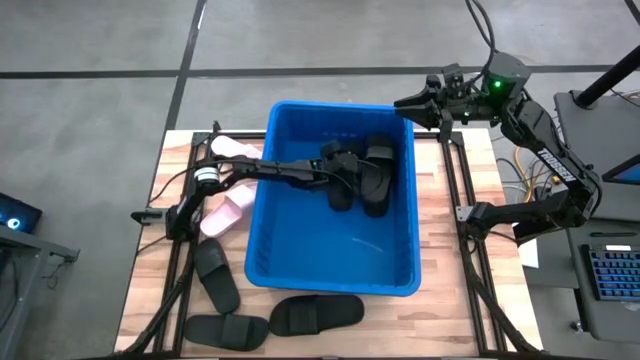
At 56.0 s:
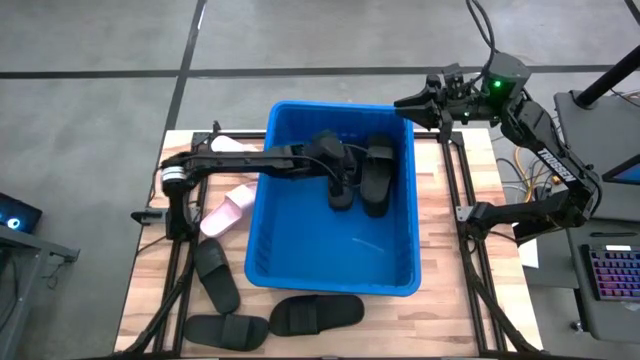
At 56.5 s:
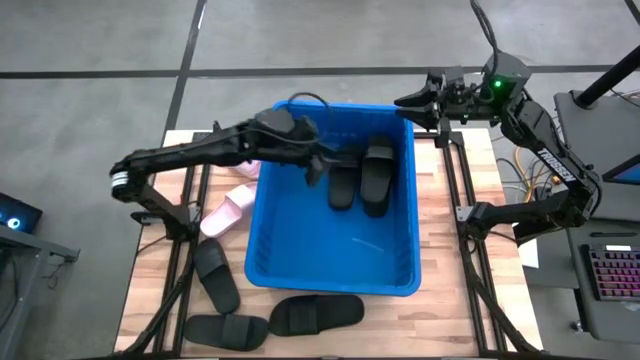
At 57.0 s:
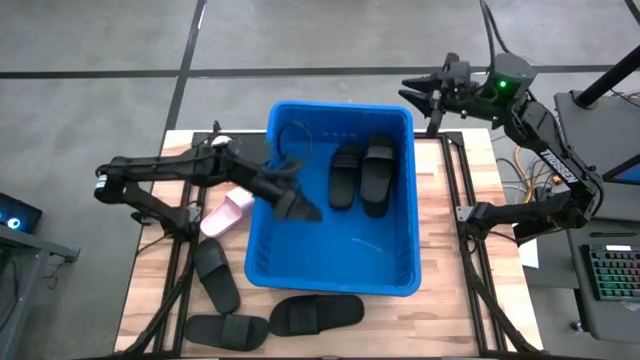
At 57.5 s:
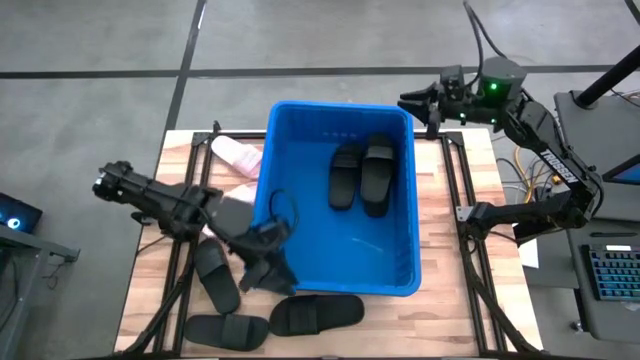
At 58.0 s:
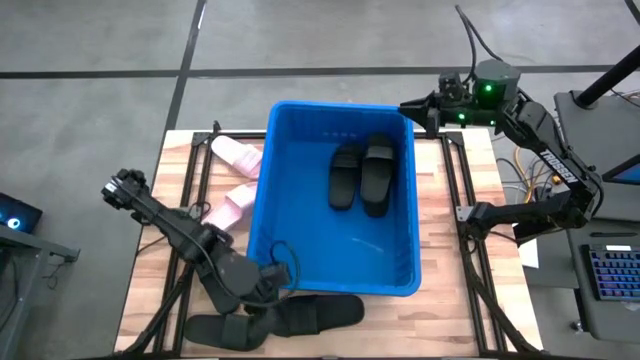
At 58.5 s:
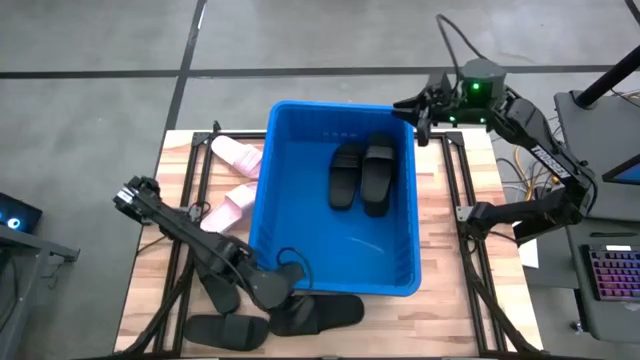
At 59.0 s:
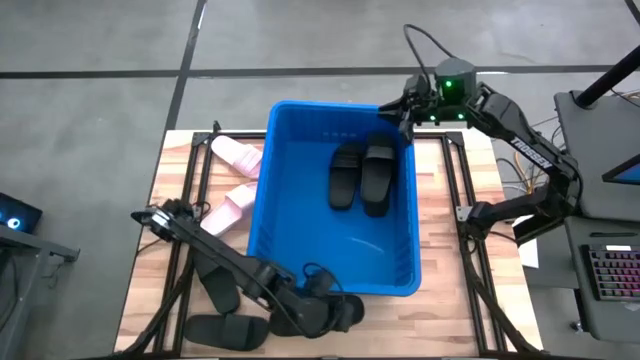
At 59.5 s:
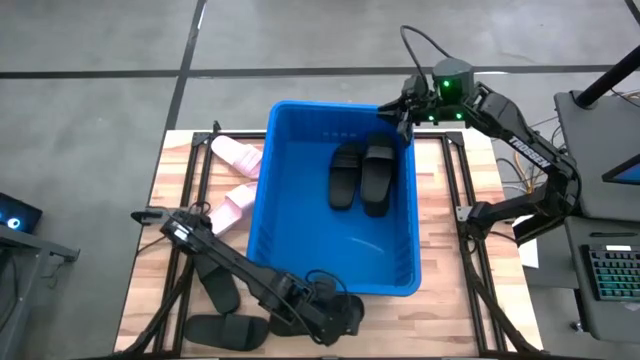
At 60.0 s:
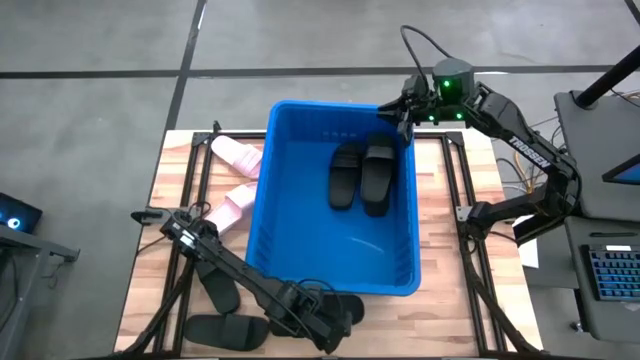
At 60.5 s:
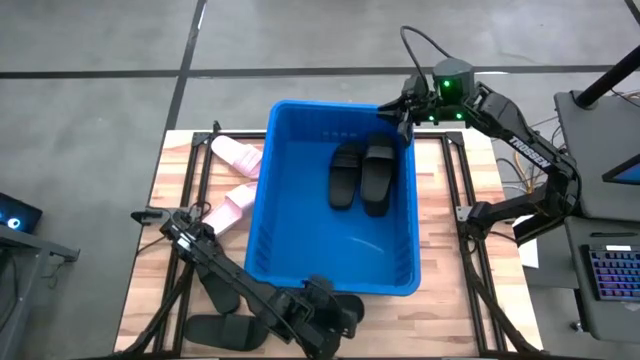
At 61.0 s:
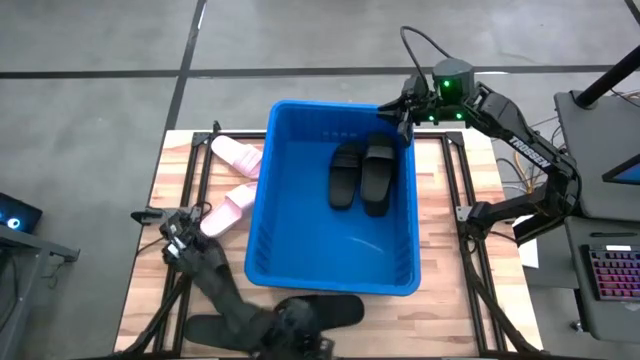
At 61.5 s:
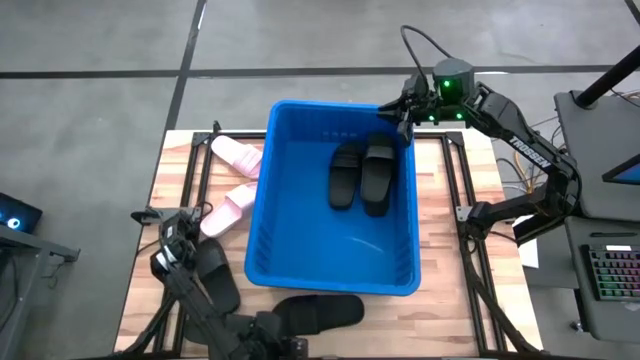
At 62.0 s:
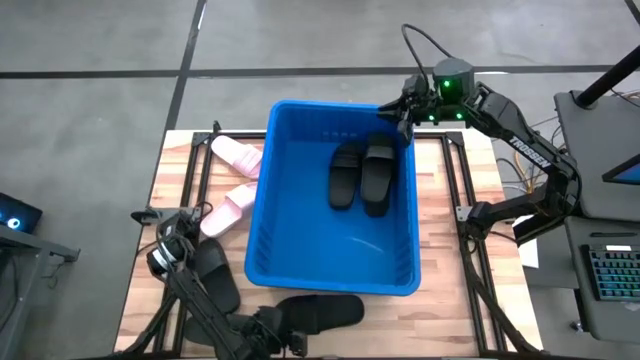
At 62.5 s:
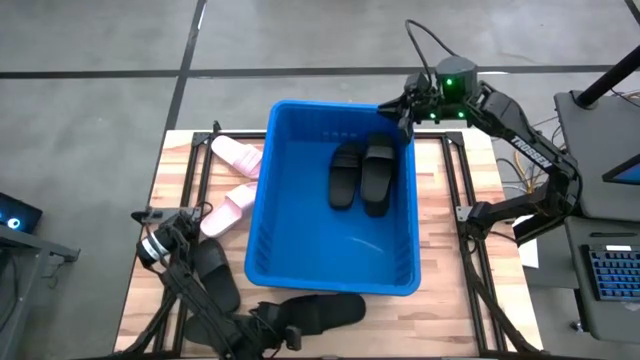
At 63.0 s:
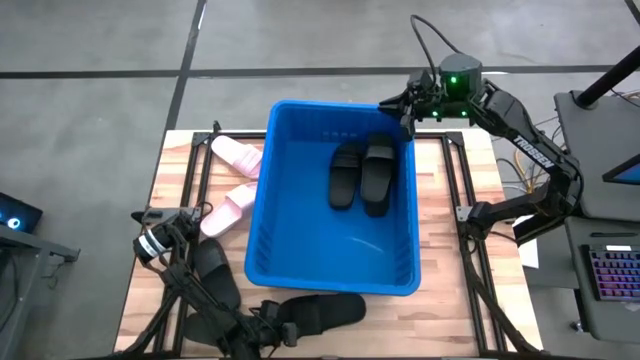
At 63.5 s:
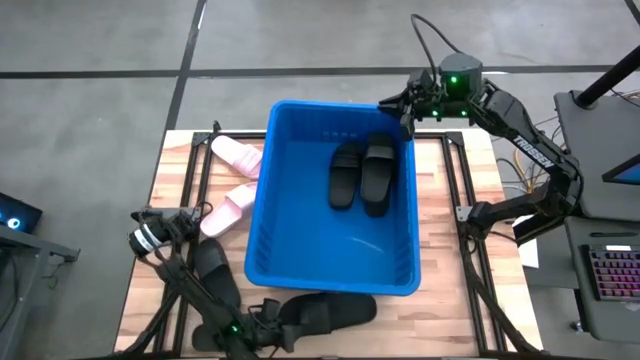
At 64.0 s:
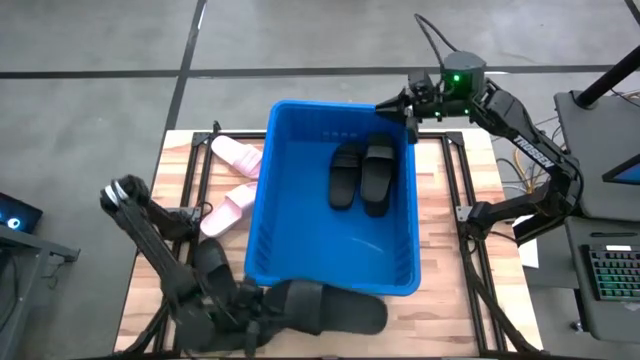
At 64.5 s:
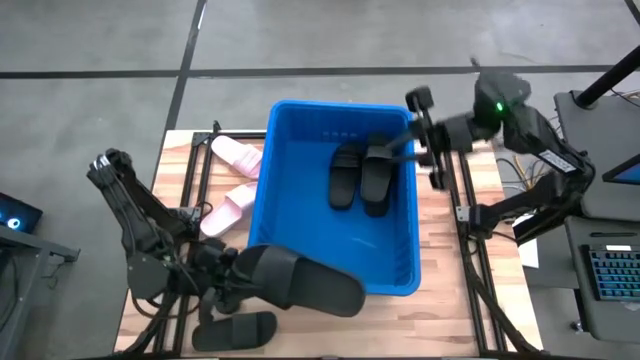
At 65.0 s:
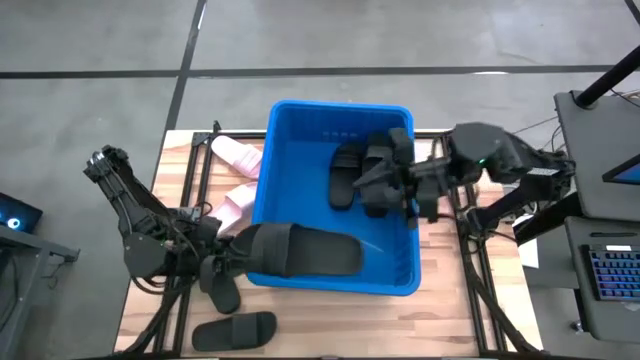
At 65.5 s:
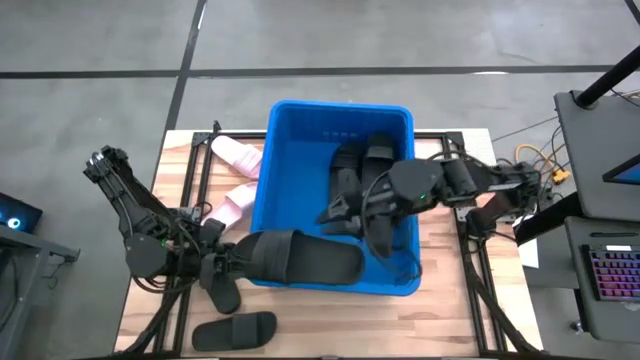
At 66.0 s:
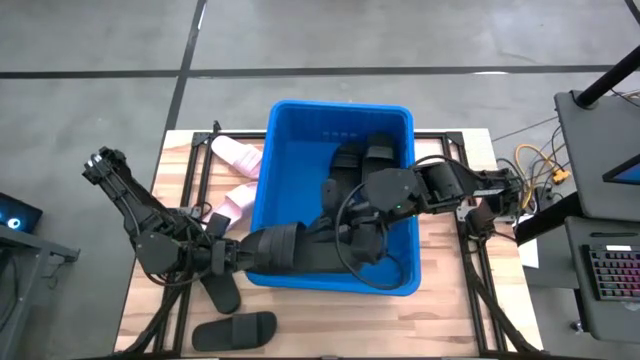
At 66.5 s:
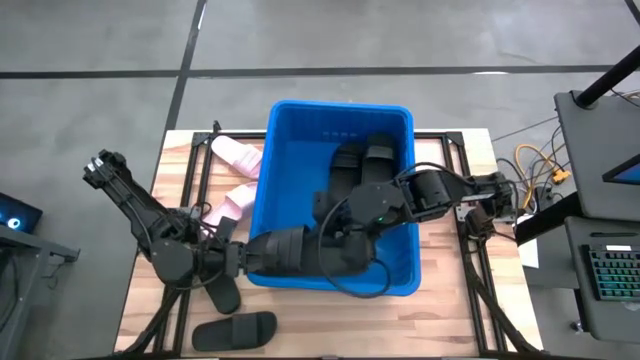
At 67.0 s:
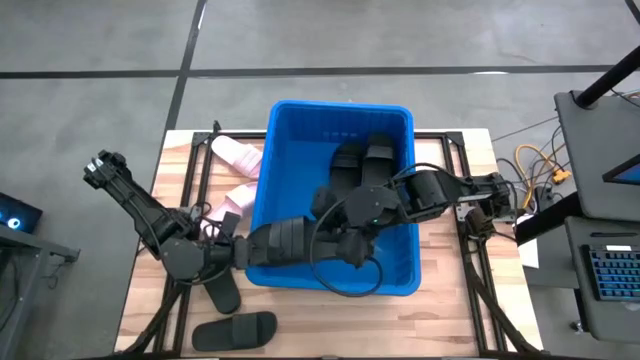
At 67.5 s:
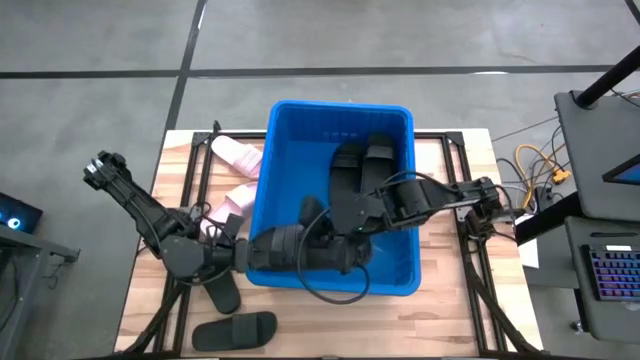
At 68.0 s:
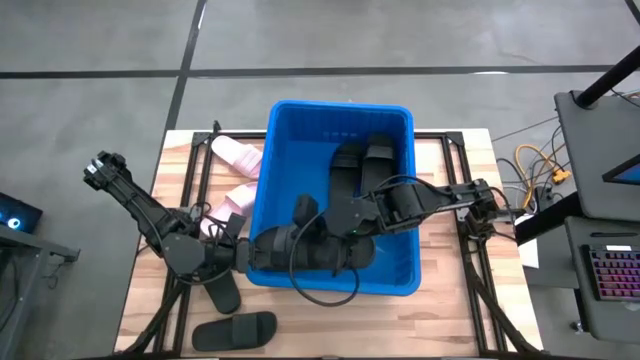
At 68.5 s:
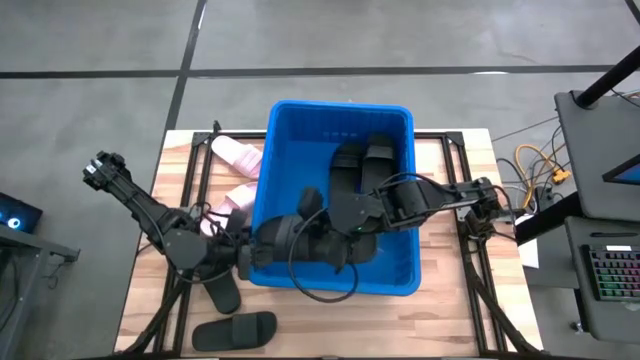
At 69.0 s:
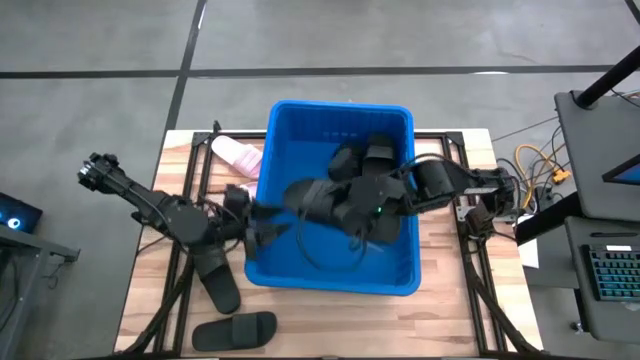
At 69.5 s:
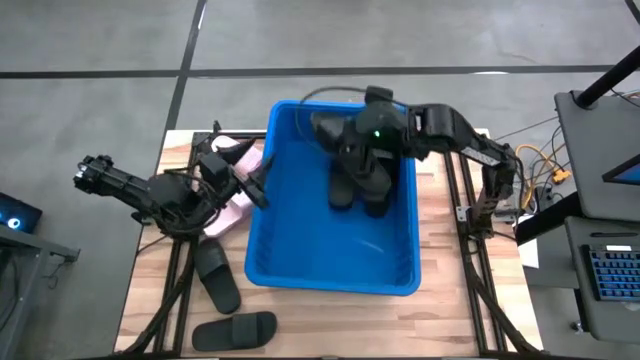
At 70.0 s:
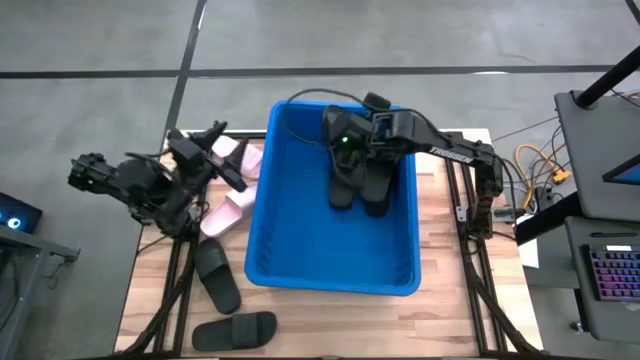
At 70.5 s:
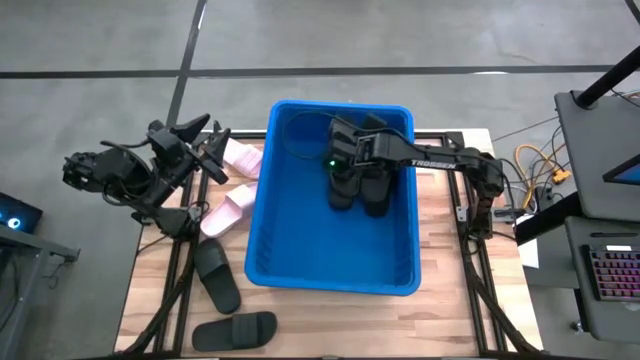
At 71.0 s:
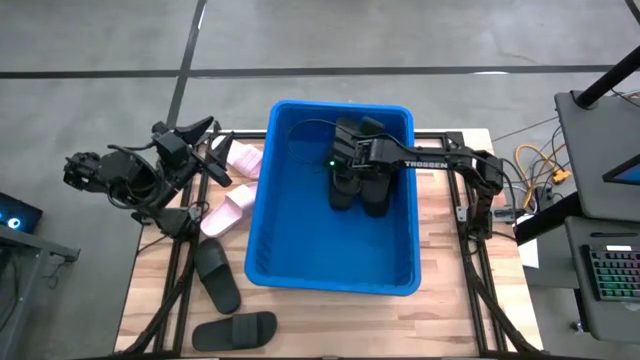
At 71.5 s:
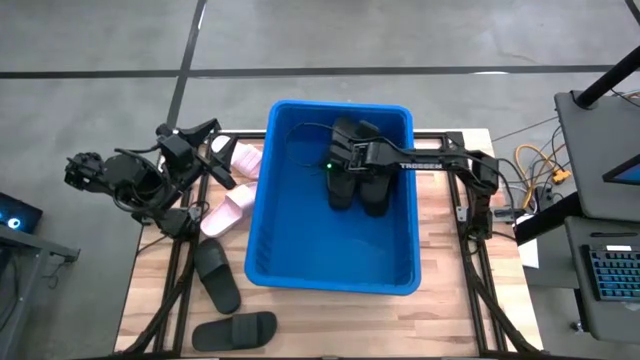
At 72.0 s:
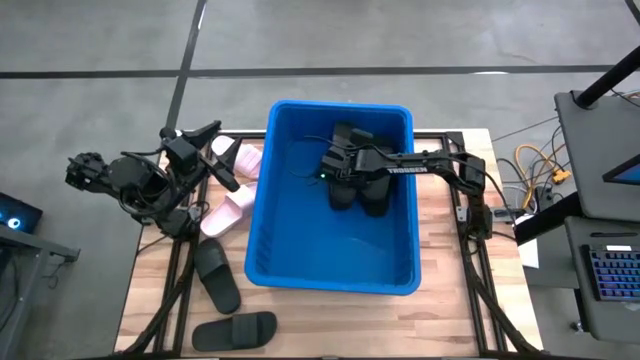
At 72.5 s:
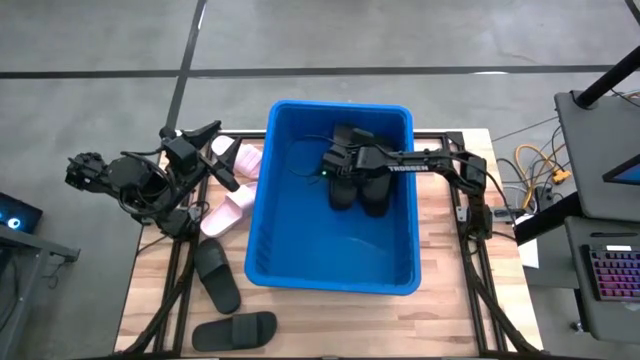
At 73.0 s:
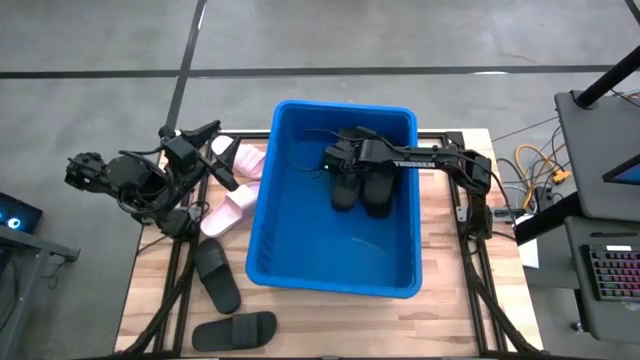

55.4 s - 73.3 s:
Task: Pick and place slides into bin
Put the black slide into the blue bin

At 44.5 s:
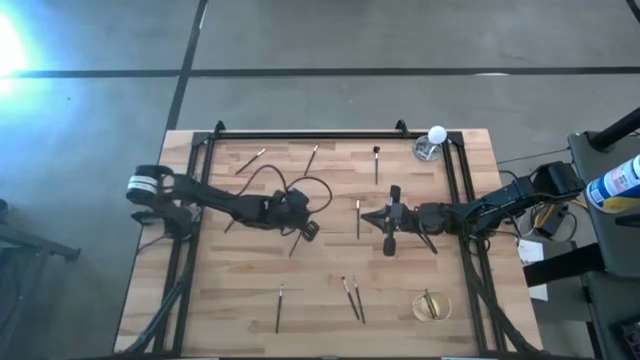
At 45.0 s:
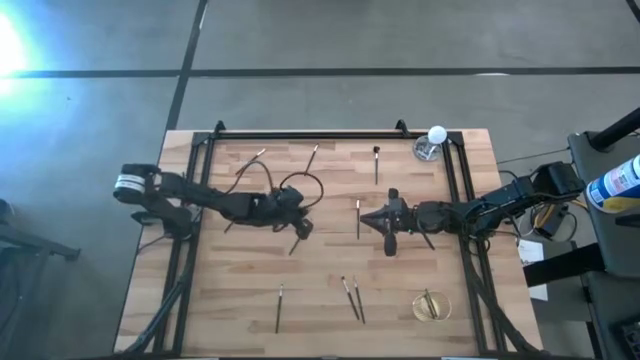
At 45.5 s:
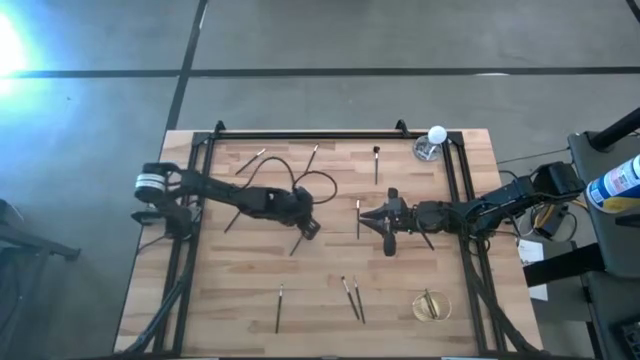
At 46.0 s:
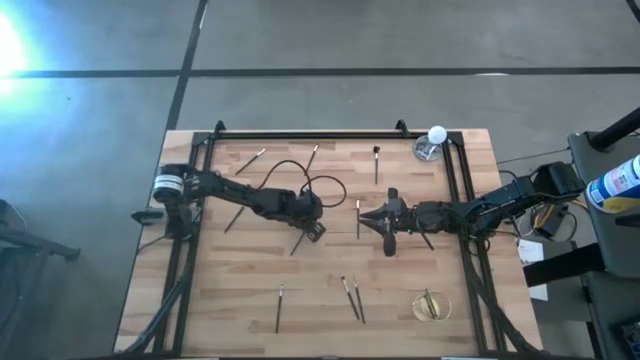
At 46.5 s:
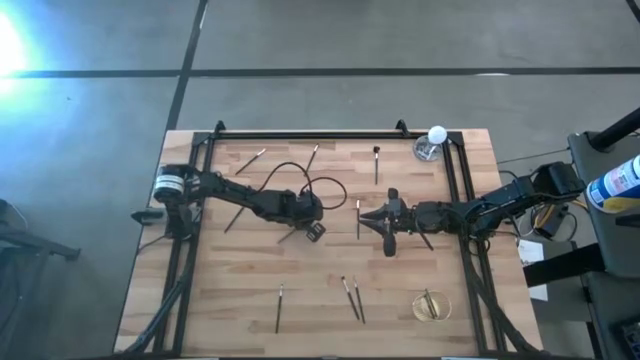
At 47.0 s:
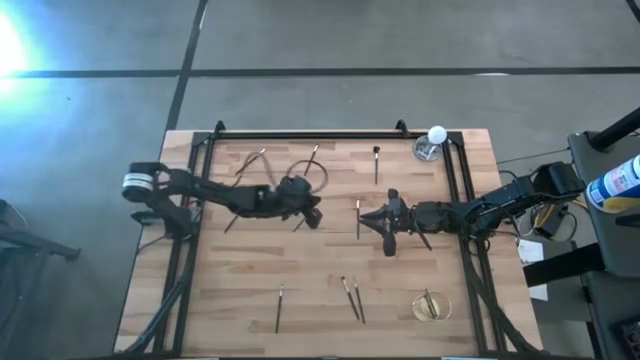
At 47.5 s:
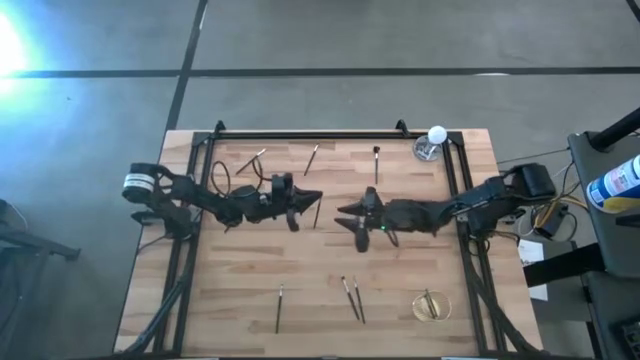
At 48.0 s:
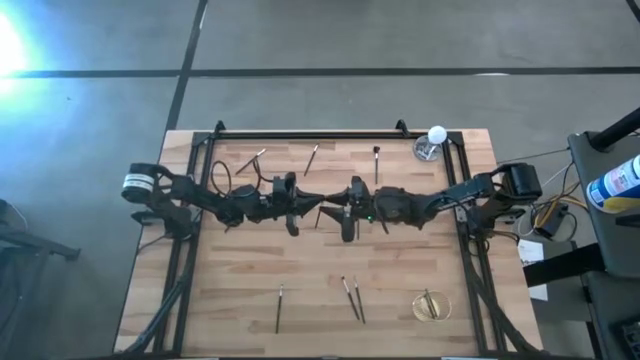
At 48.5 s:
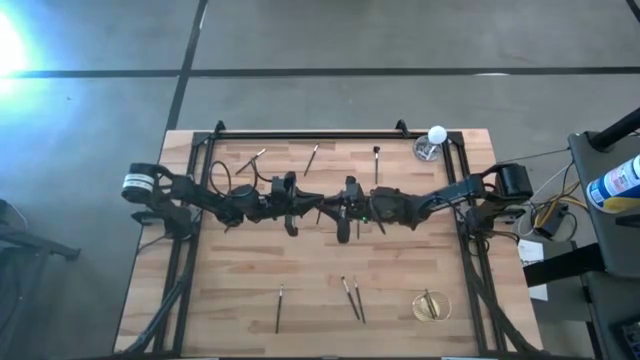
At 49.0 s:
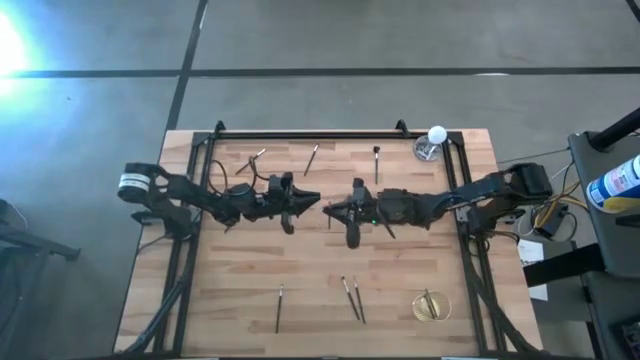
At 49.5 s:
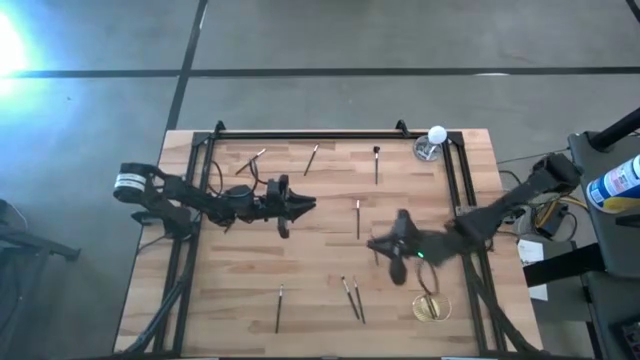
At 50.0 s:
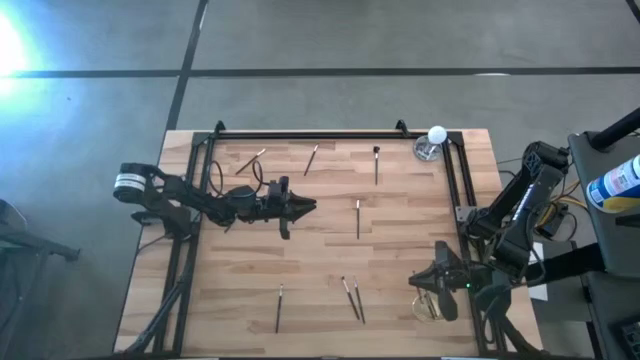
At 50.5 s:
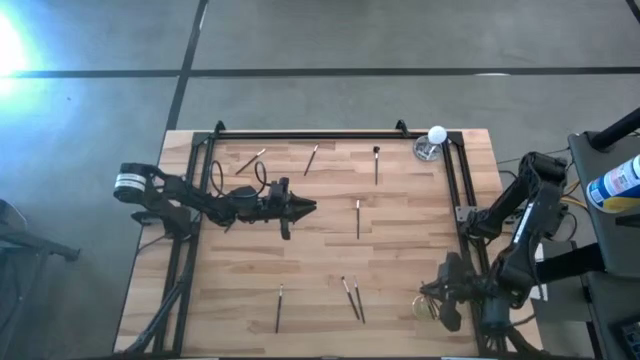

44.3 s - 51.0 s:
Task: Pick & Place Makeup Brushes
Put the eyeshadow brush into the makeup brush holder
